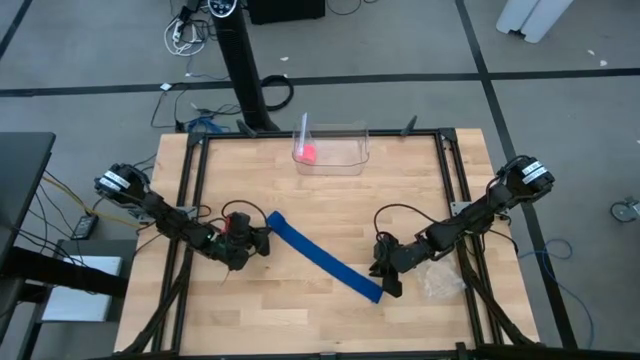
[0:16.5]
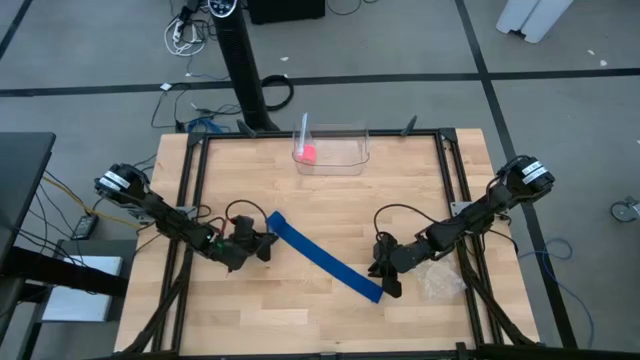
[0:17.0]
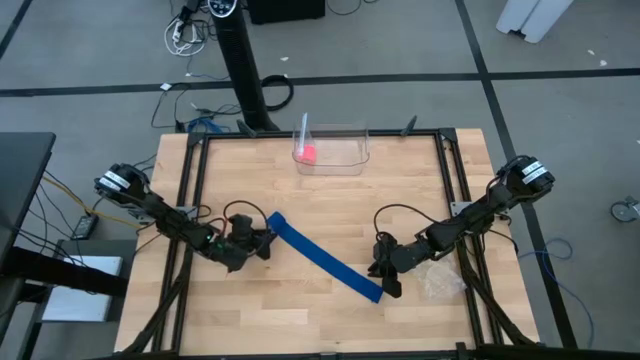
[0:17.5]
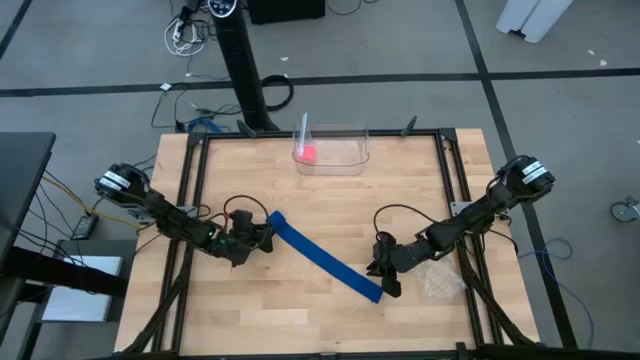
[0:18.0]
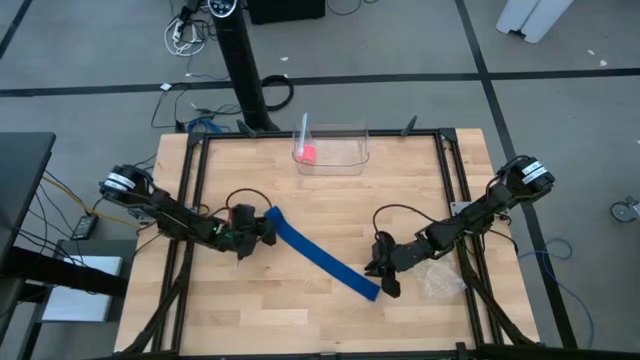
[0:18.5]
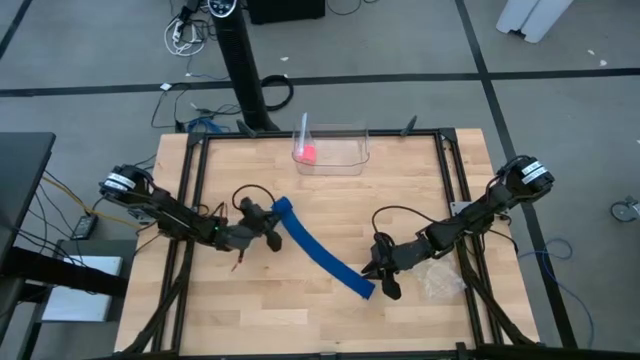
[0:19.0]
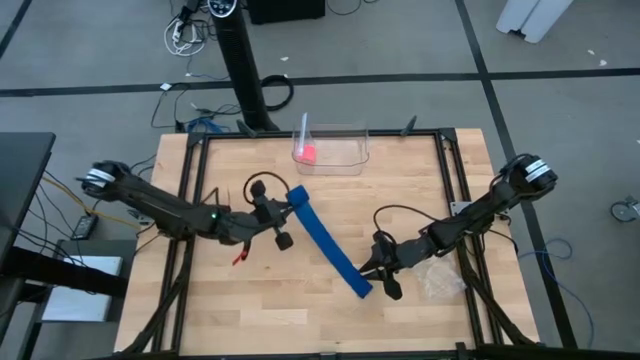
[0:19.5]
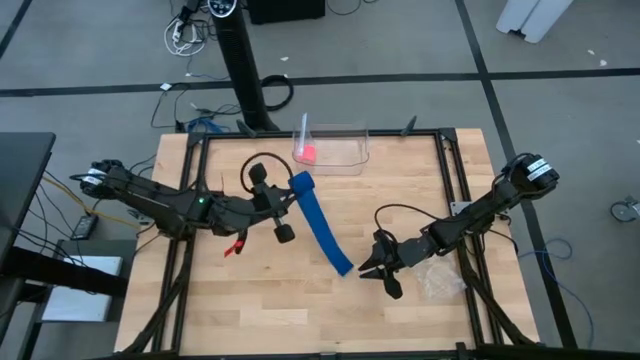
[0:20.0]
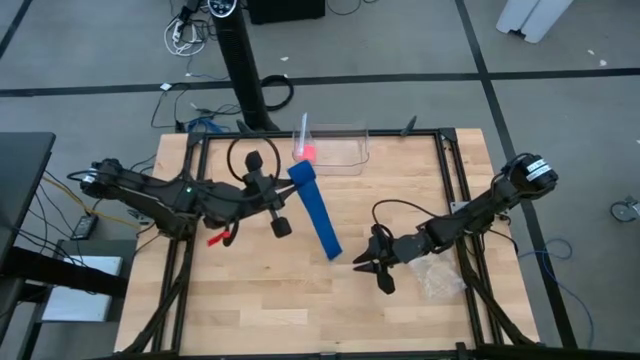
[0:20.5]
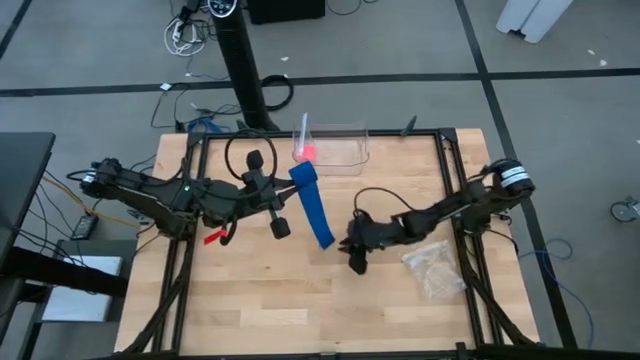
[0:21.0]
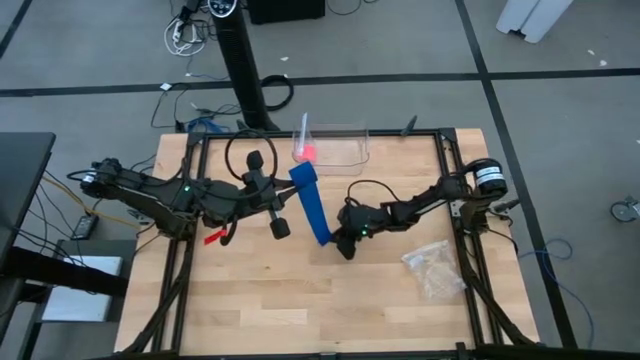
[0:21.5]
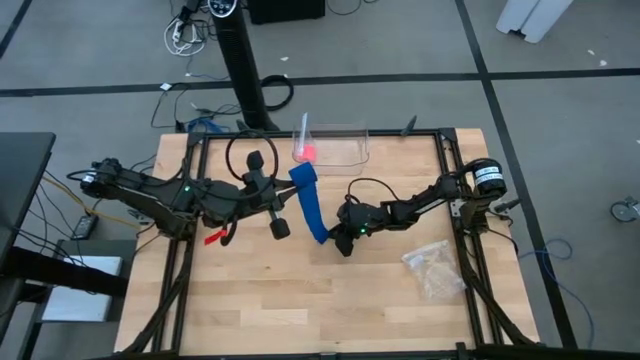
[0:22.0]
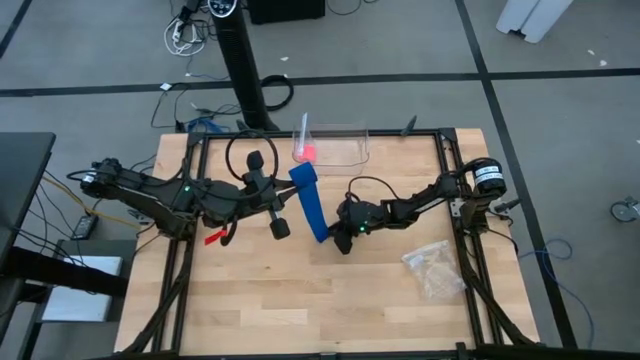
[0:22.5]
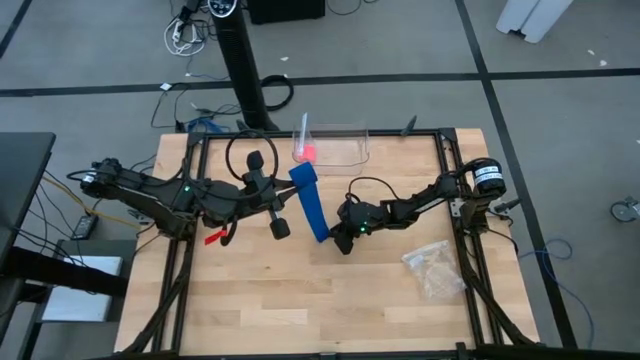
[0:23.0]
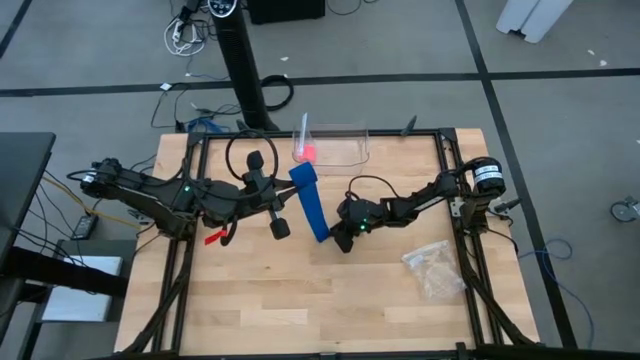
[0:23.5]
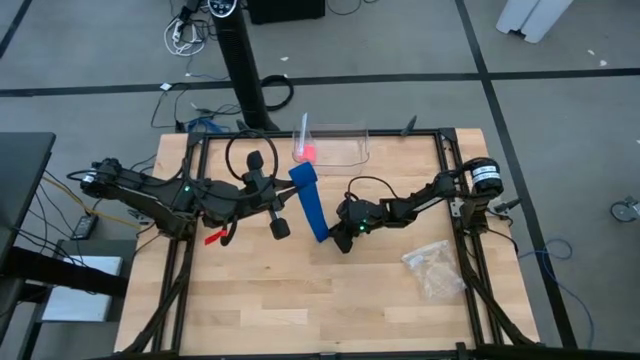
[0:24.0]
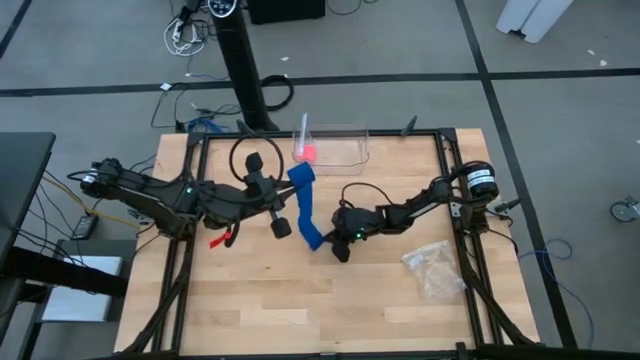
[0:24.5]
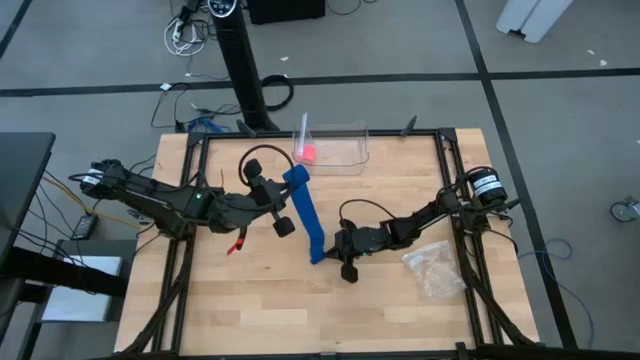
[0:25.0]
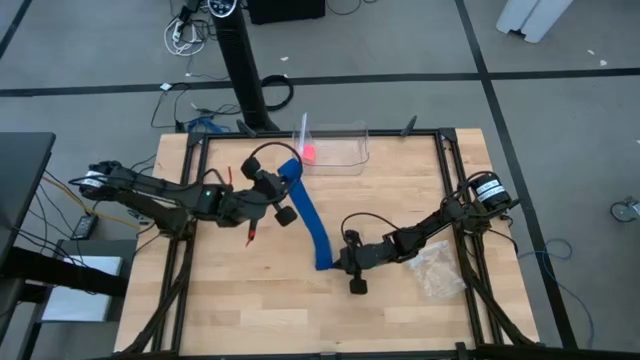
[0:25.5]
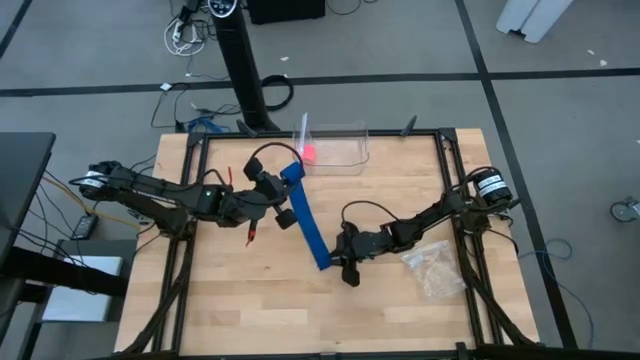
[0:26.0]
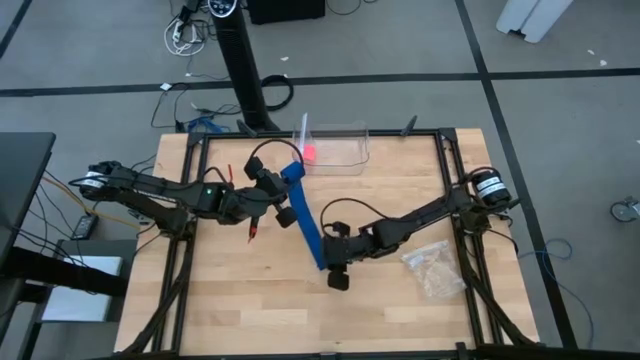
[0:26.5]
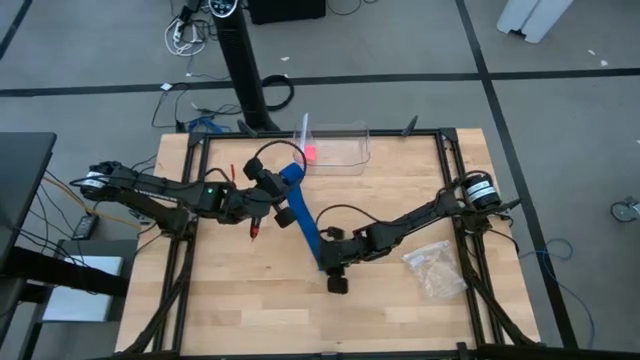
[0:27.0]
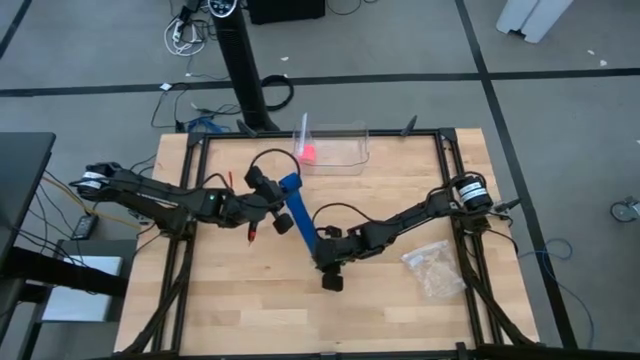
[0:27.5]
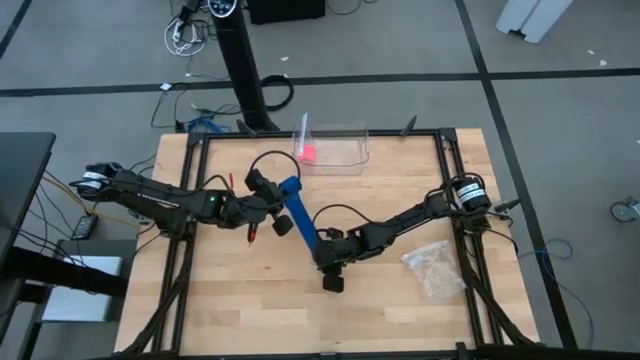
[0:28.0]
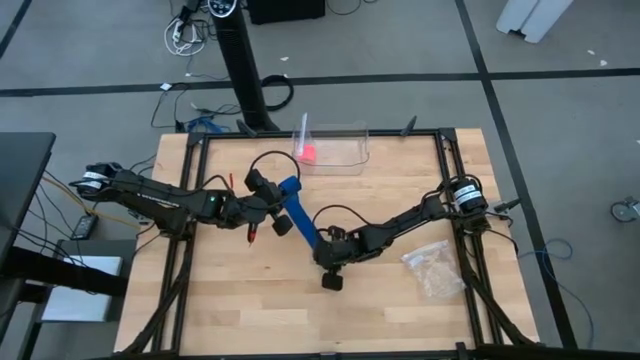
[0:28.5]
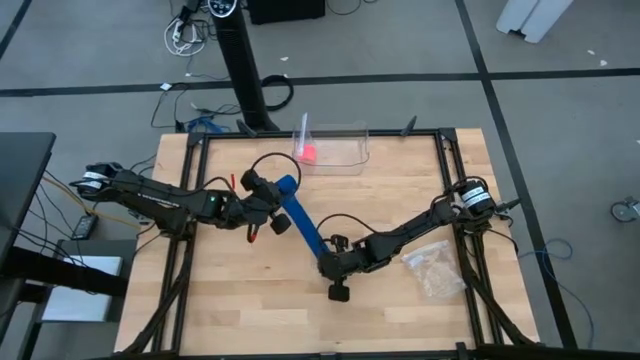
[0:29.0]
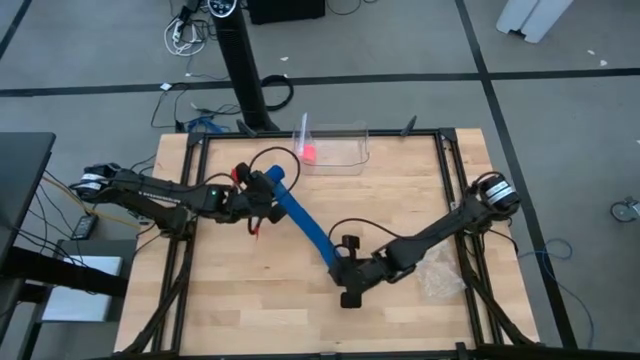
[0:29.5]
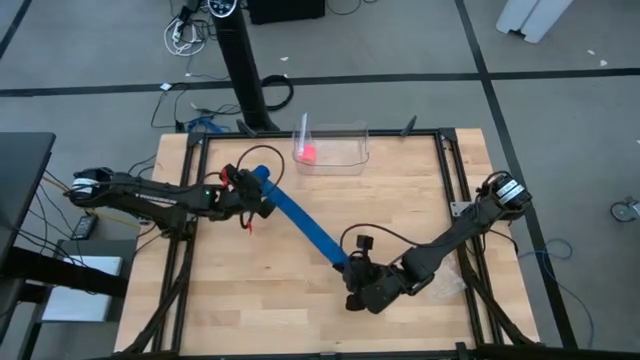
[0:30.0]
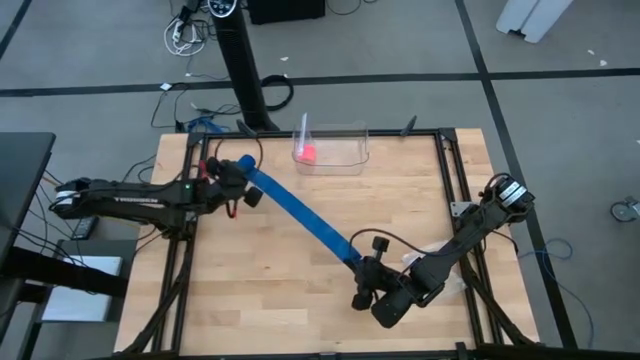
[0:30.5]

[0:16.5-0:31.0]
Task: Roll bandage
Roll the blue bandage

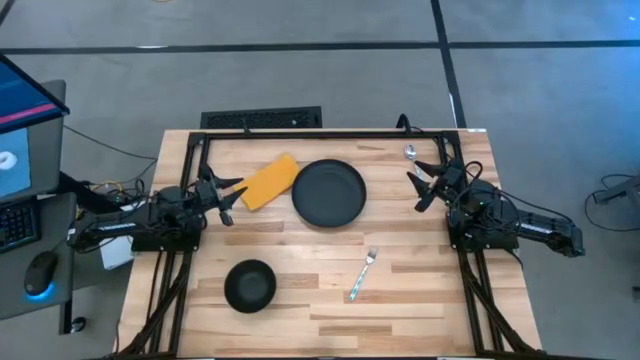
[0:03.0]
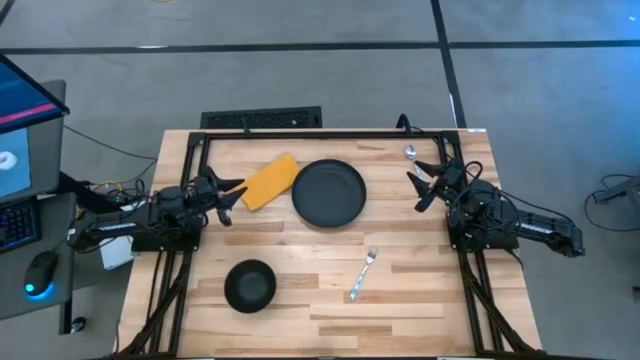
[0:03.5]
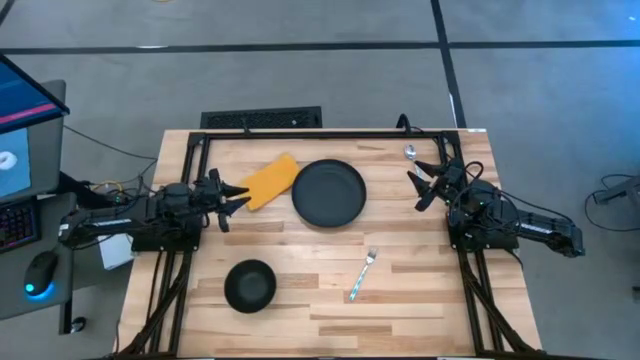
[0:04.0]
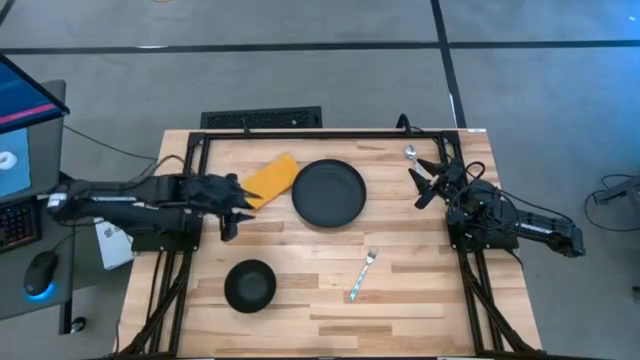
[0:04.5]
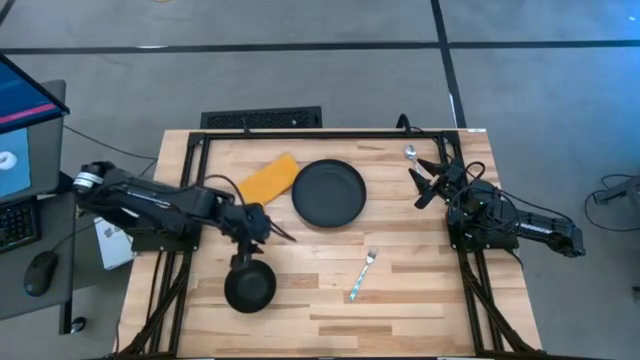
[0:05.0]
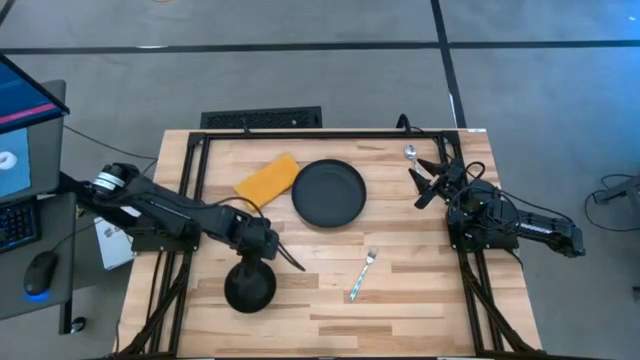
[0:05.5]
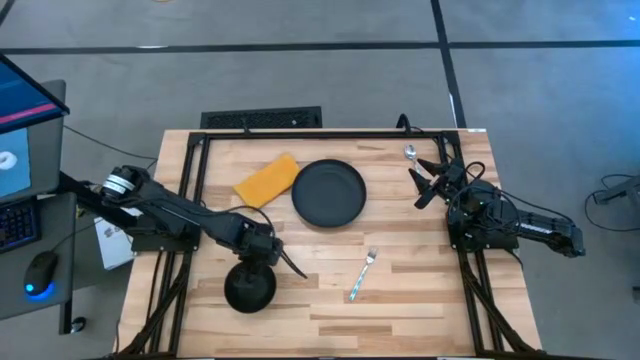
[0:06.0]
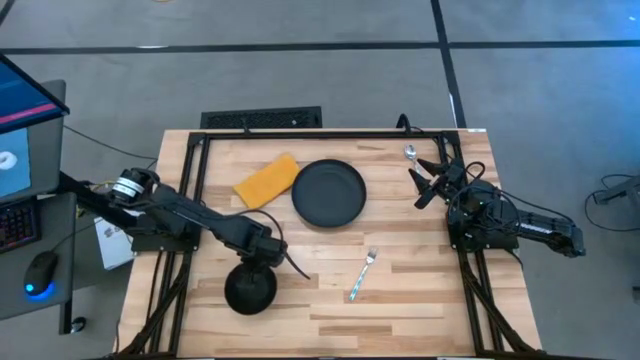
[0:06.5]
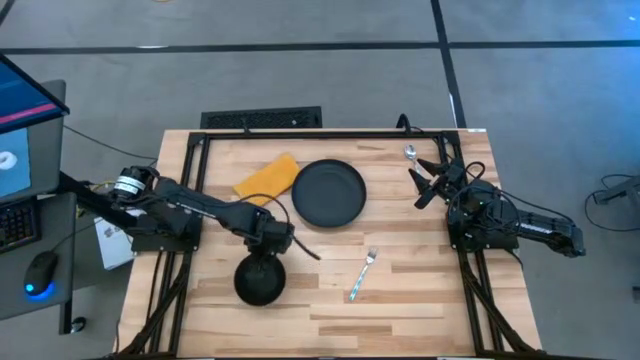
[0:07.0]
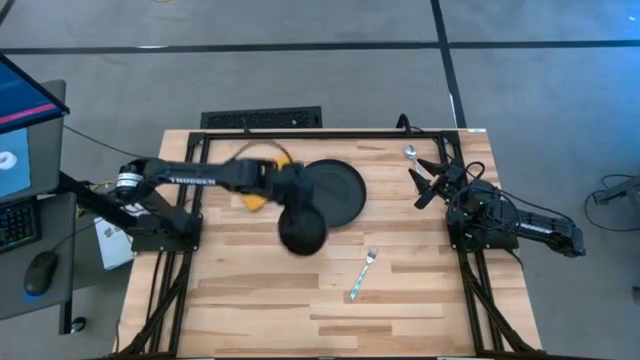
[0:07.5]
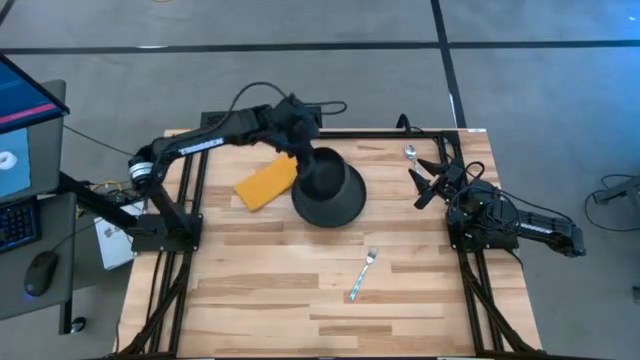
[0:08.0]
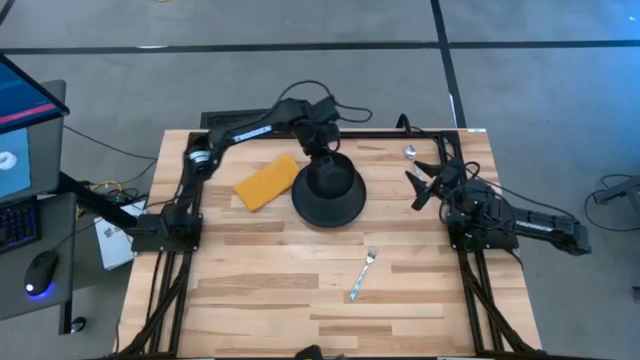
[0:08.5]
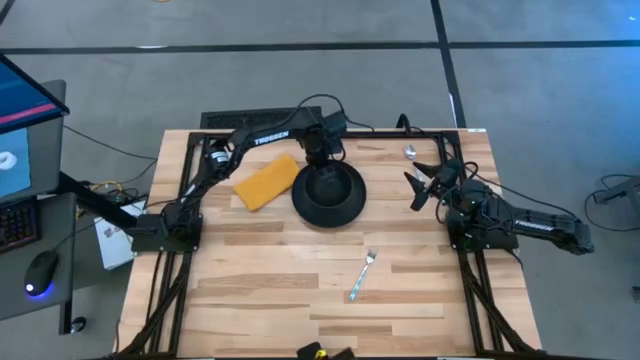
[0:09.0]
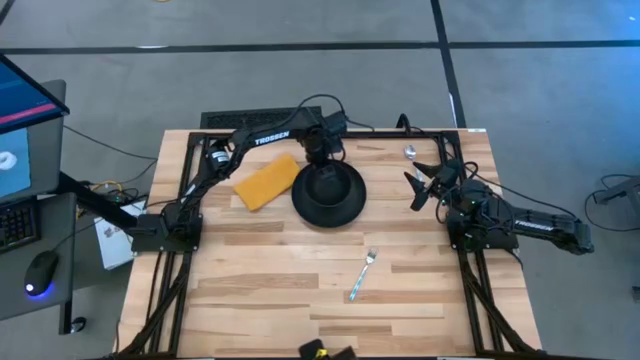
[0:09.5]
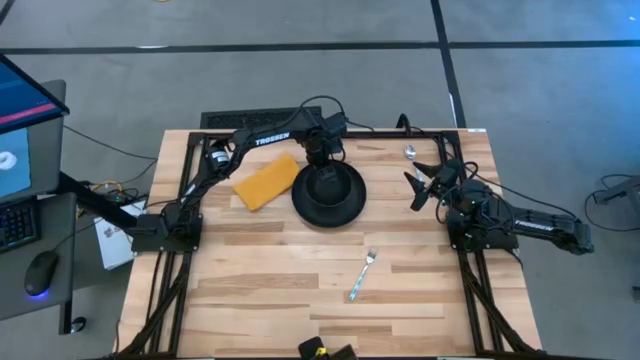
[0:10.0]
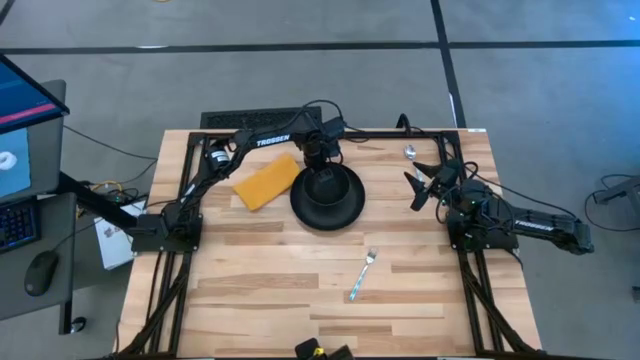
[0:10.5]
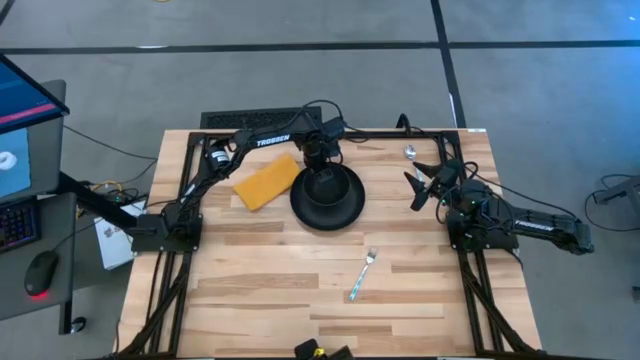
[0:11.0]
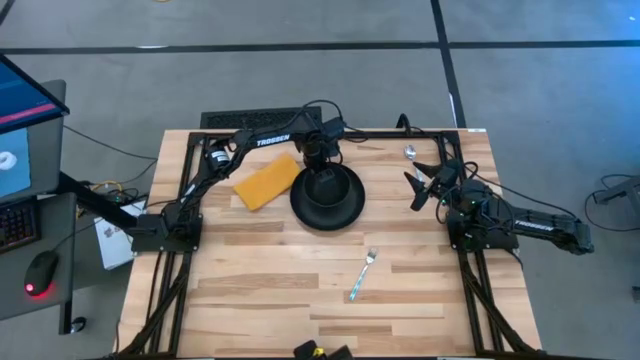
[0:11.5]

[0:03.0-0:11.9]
Task: Set table place
Put the black bowl on top of the black plate
